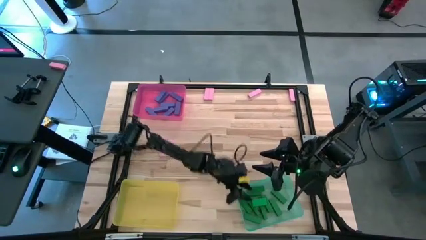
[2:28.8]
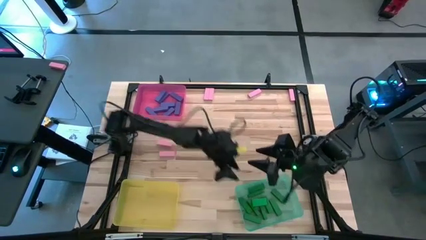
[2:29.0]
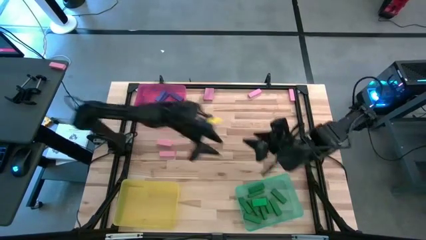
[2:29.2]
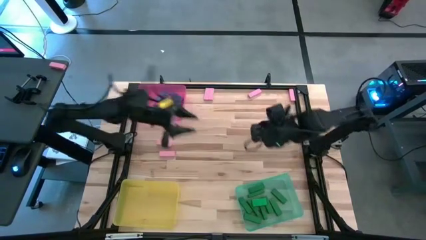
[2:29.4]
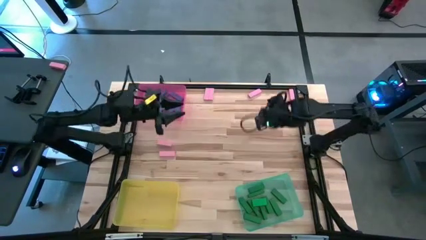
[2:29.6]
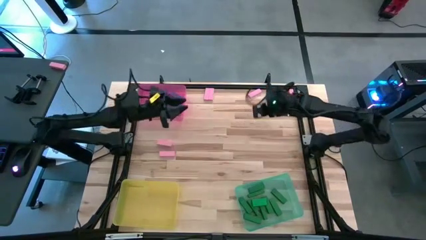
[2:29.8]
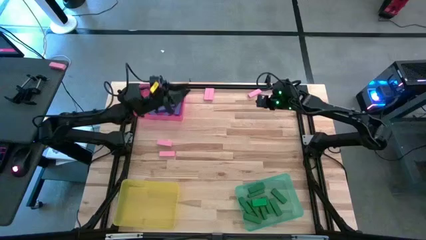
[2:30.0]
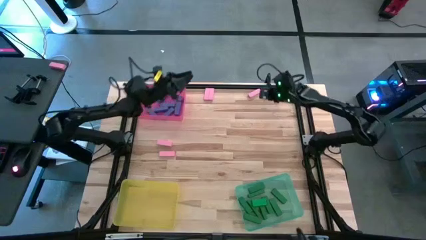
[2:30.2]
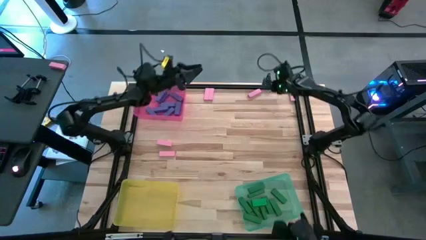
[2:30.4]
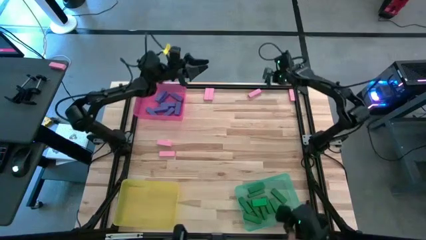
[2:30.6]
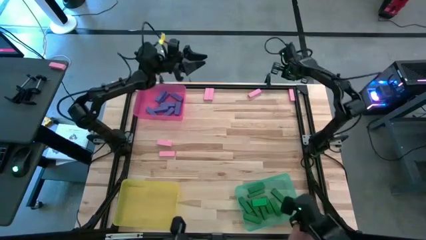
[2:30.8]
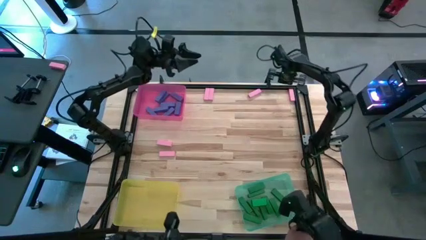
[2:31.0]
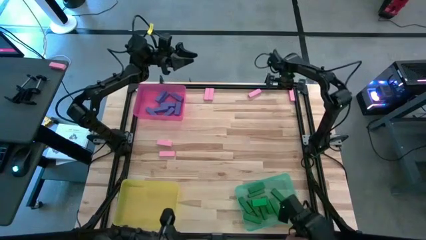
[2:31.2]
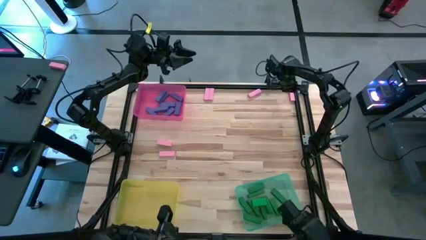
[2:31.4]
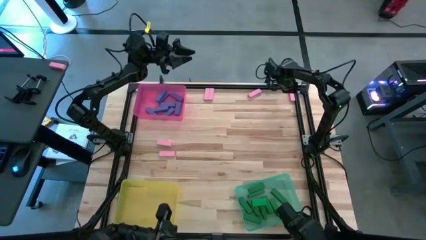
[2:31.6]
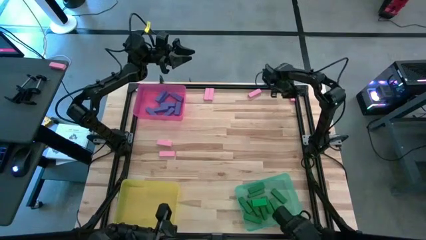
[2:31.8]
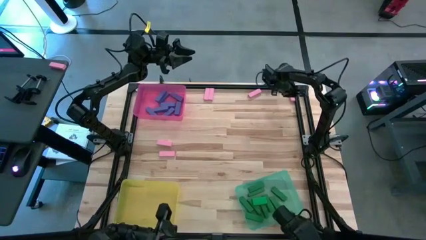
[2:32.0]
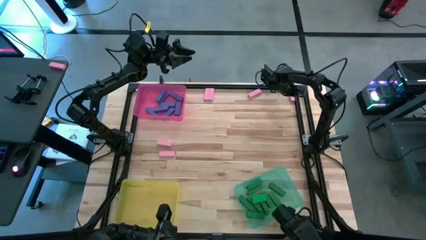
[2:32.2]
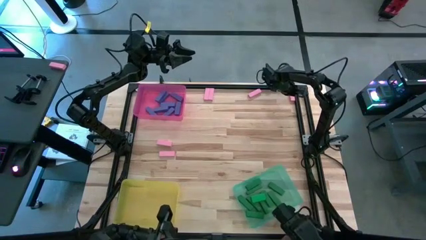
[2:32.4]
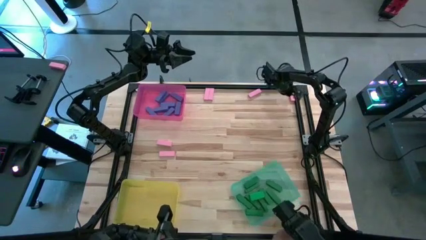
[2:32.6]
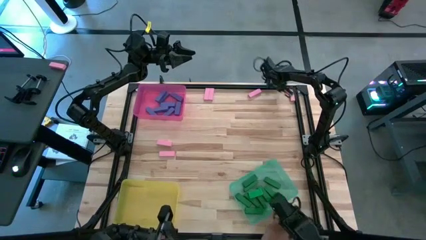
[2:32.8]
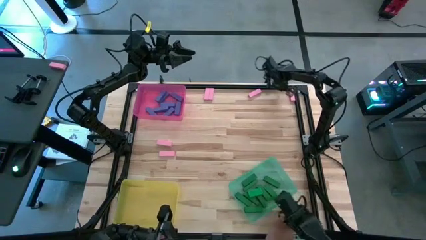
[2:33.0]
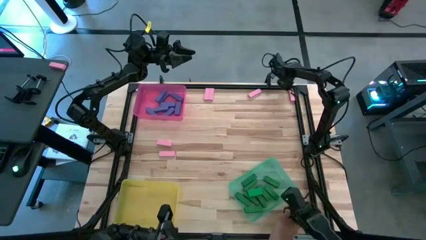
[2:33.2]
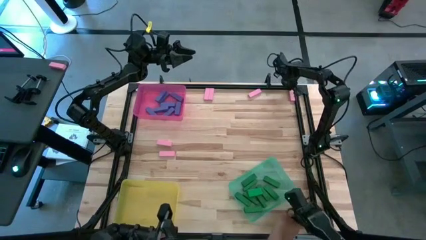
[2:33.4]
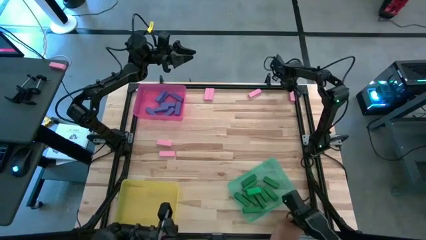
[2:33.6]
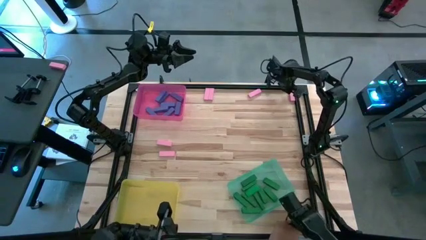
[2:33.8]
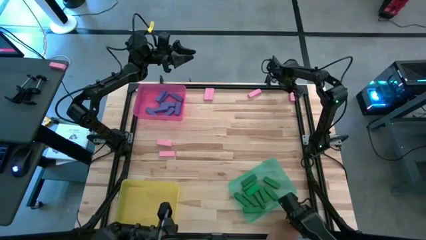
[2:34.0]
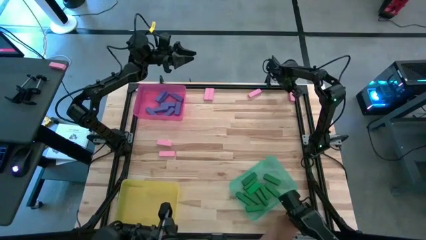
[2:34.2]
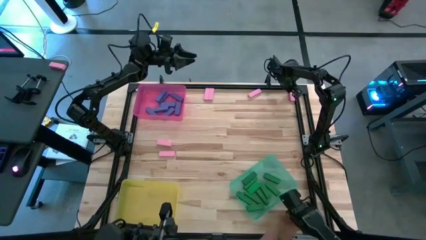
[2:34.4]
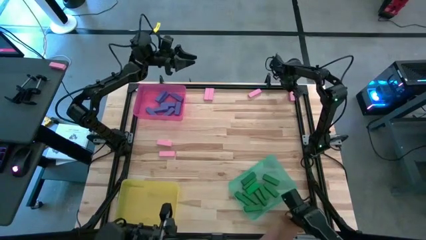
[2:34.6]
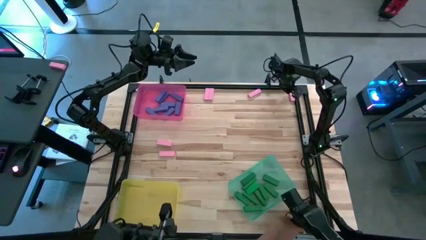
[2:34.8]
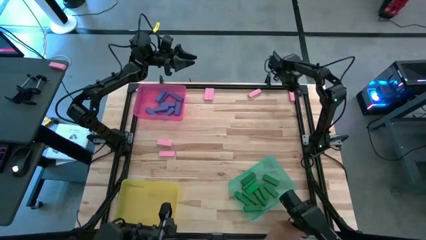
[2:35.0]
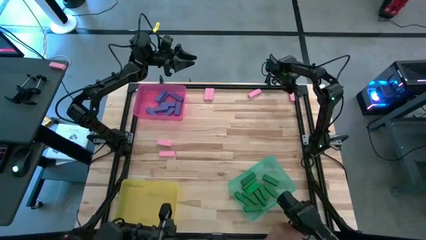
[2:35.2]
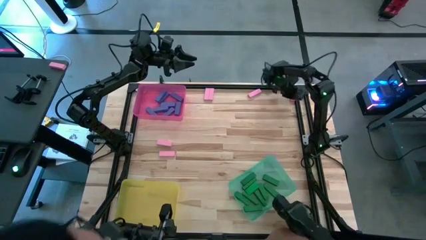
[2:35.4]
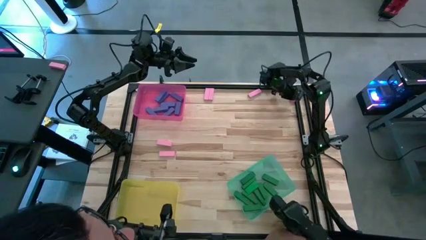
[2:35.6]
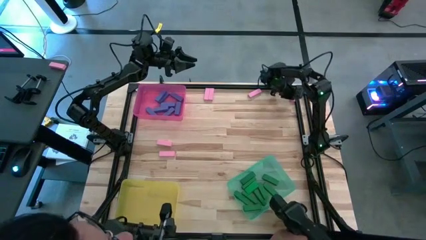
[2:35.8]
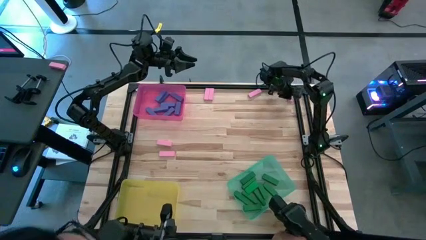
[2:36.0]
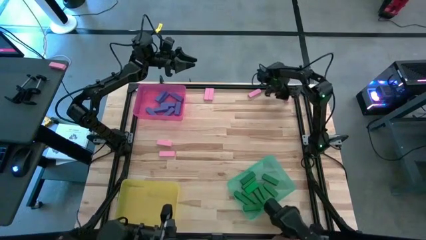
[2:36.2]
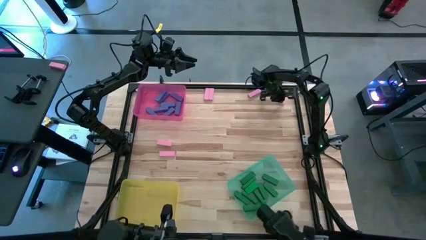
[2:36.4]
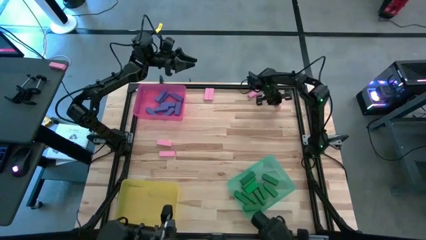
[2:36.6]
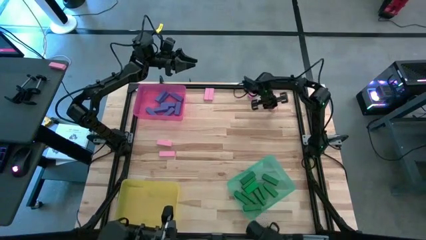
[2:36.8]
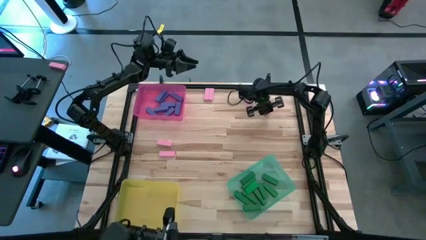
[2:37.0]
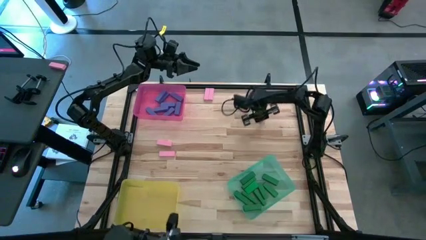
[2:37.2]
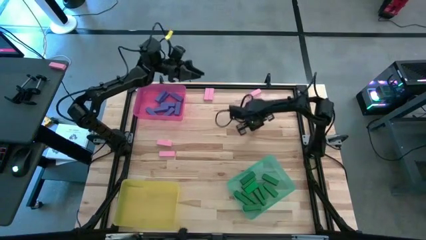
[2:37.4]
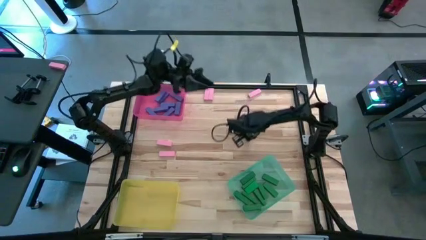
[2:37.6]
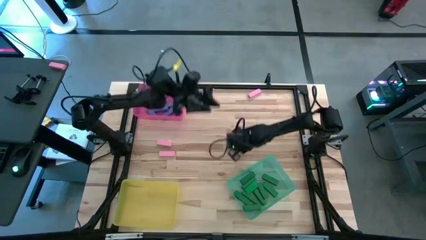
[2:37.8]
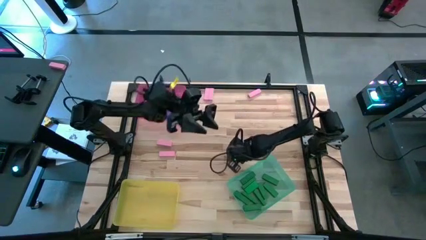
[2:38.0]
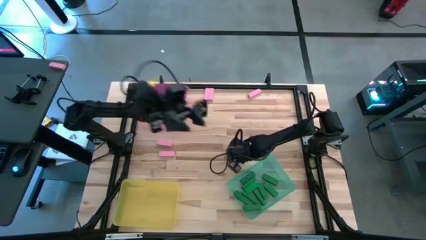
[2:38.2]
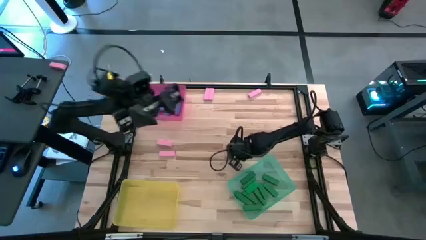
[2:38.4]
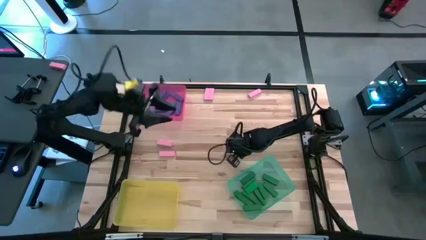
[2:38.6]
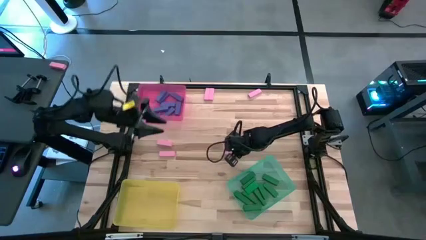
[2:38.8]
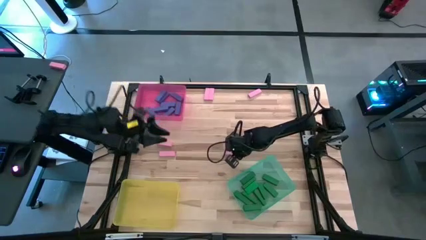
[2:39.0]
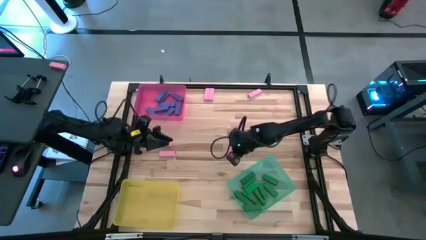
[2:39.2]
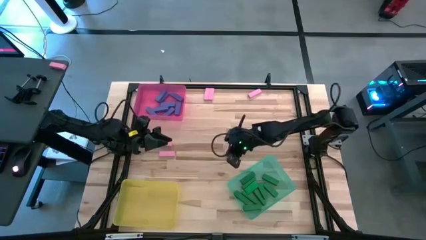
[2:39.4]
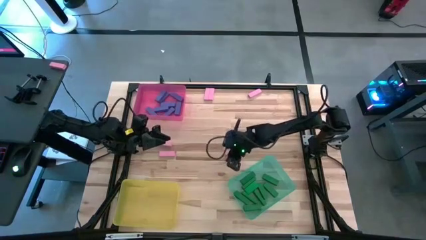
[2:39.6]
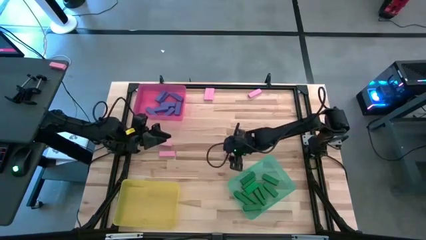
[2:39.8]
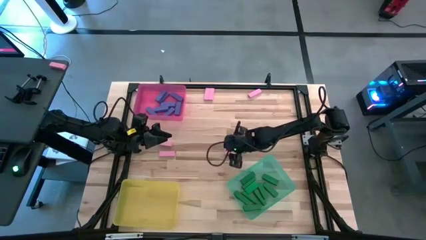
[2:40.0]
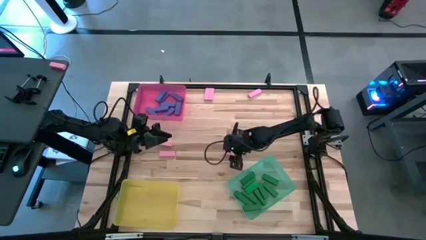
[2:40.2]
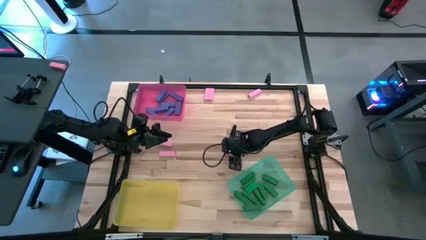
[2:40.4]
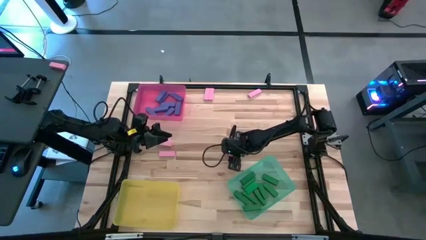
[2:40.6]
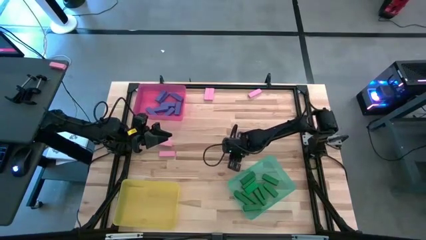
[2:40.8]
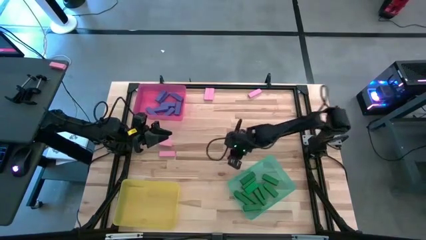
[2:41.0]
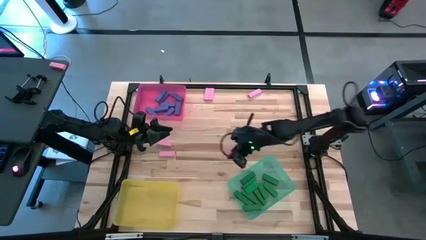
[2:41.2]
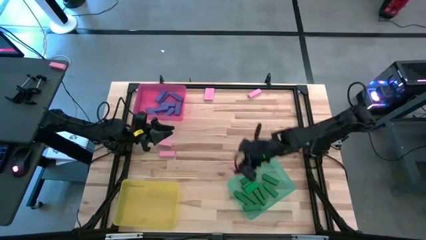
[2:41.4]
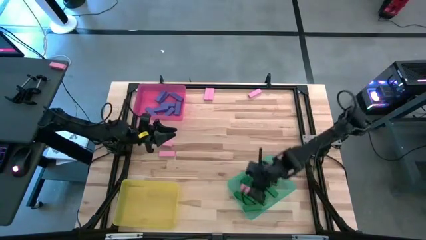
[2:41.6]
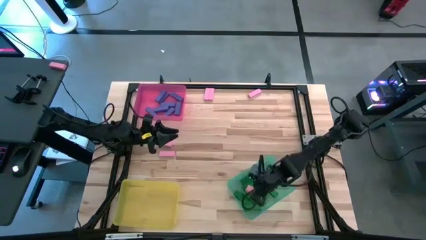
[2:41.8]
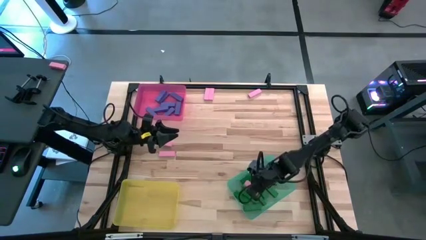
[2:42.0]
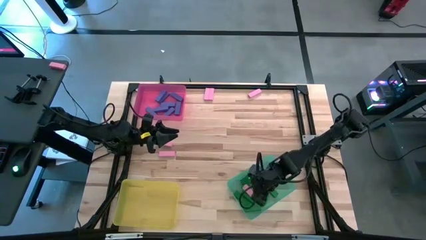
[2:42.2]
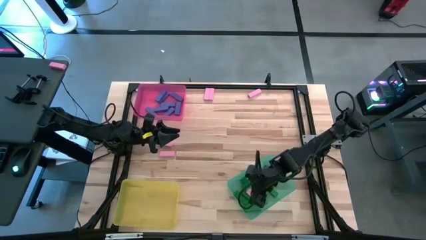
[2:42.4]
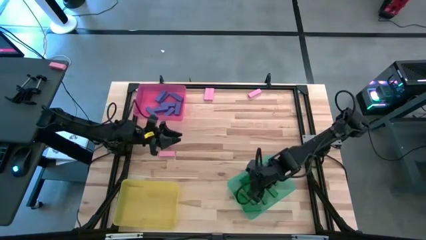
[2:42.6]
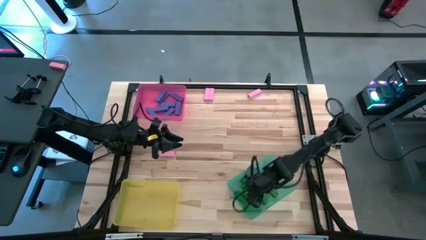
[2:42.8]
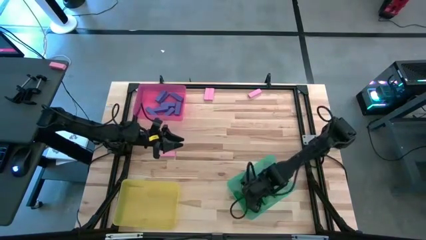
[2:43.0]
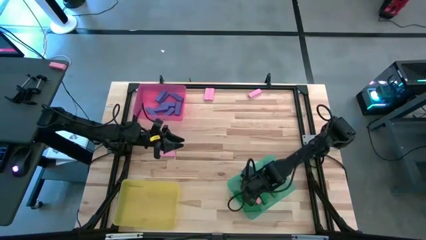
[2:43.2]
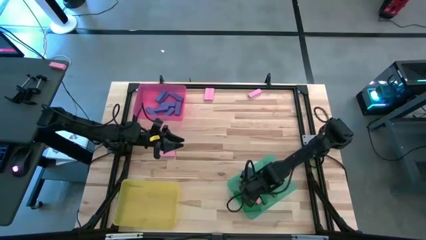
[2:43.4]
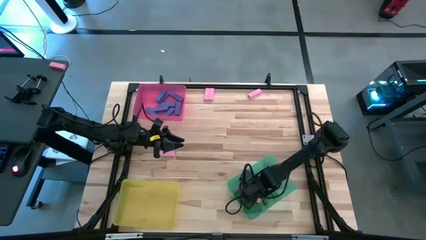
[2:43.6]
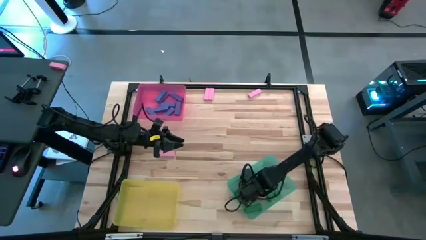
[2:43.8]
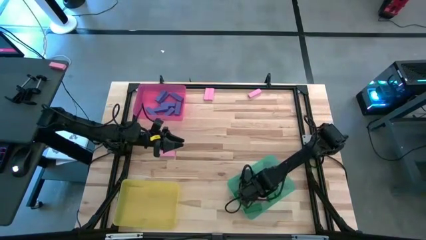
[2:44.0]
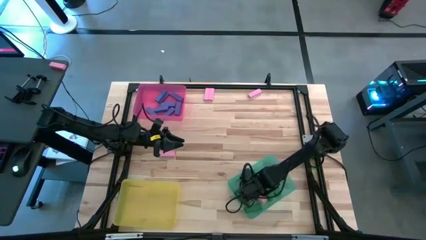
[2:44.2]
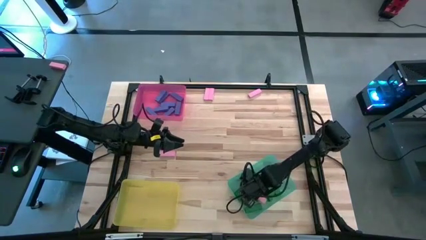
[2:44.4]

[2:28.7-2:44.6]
Task: Sort blocks
Put the pink block into the yellow bin

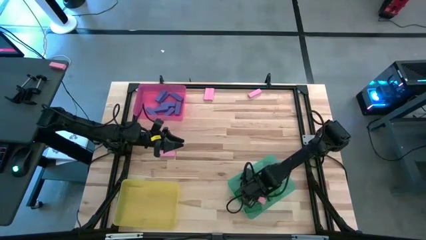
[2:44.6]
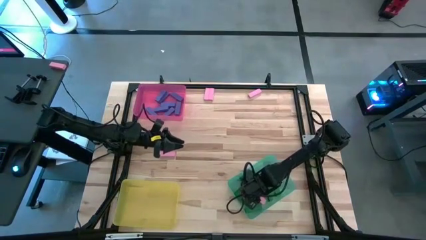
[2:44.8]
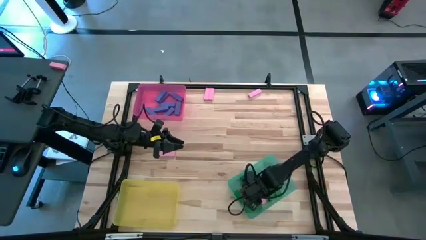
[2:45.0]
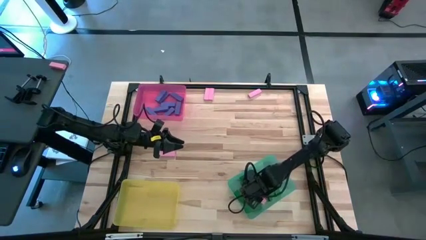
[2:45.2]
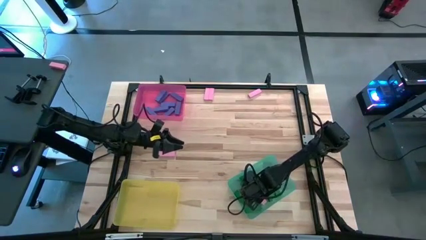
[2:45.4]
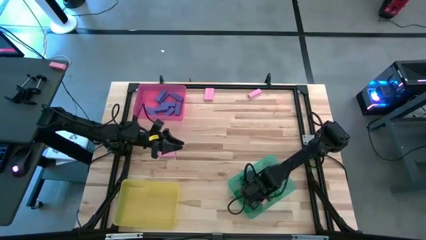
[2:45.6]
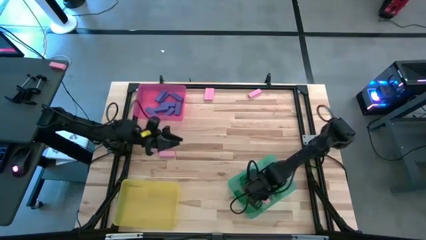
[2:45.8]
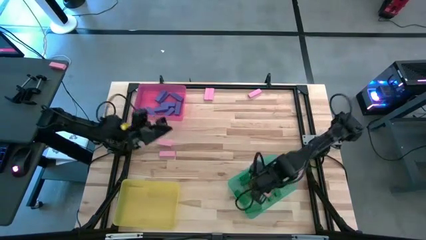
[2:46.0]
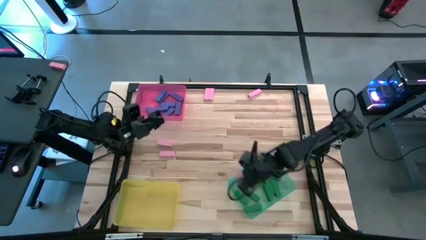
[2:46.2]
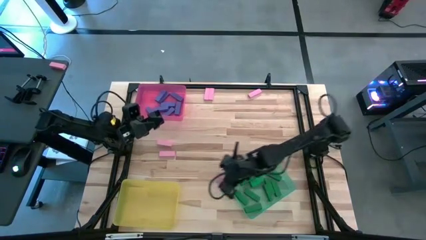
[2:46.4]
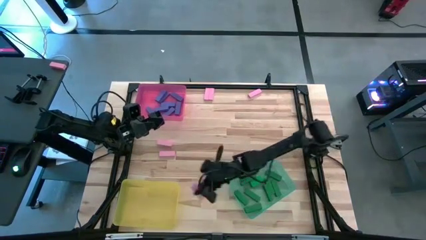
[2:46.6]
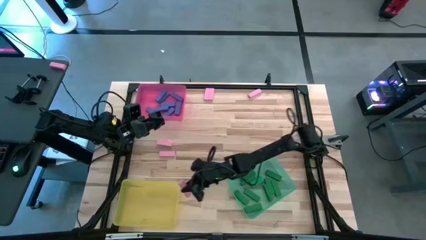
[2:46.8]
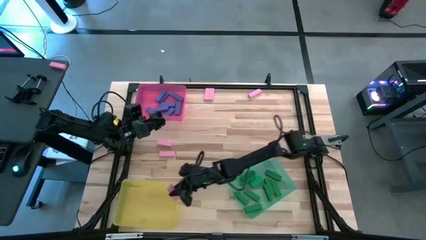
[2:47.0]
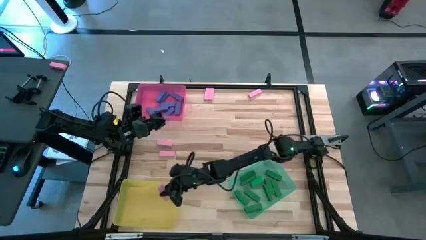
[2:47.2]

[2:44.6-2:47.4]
Remove the pink block from the light green bin and put it into the yellow bin
